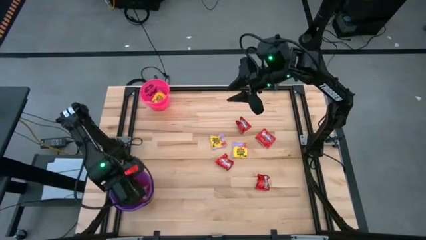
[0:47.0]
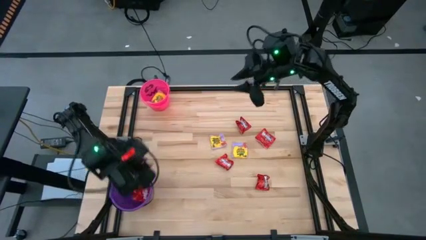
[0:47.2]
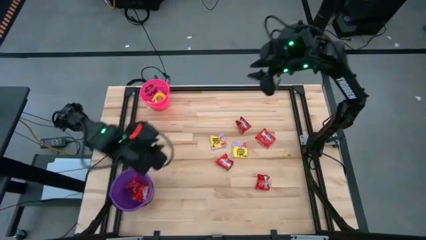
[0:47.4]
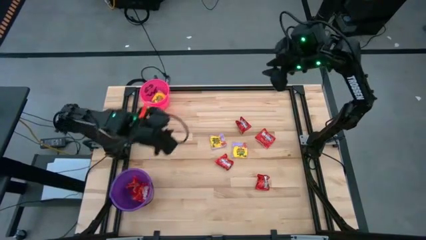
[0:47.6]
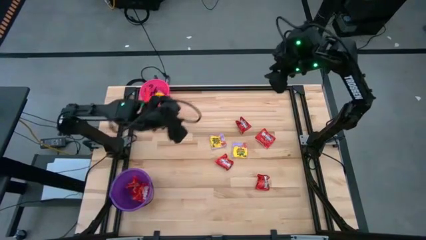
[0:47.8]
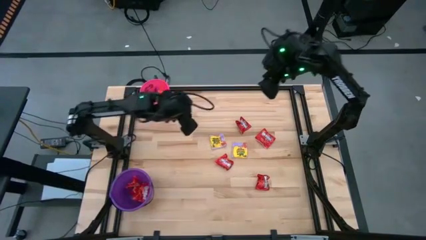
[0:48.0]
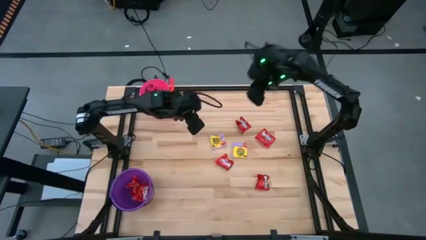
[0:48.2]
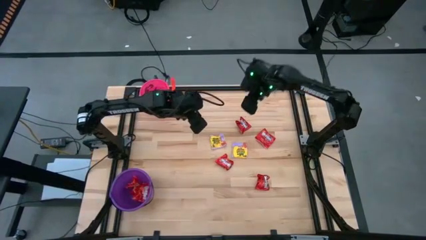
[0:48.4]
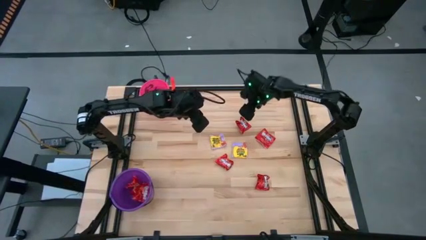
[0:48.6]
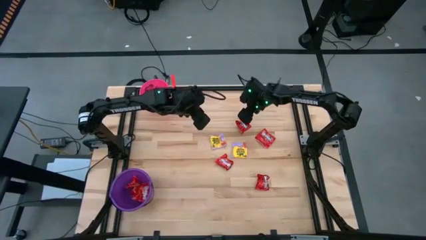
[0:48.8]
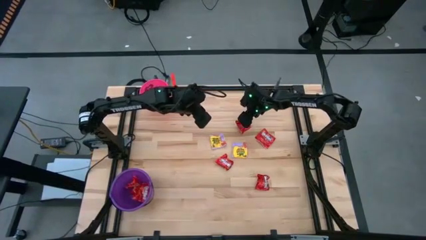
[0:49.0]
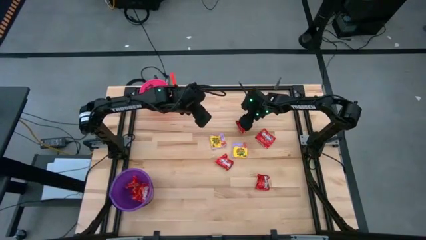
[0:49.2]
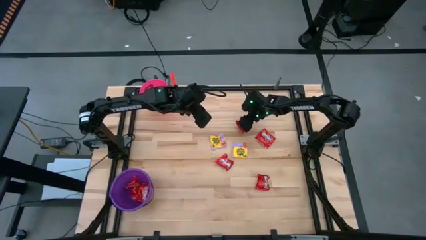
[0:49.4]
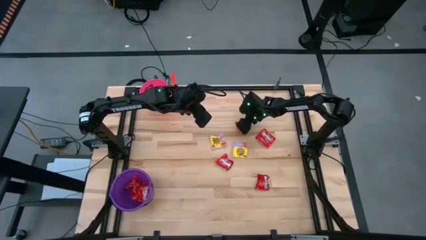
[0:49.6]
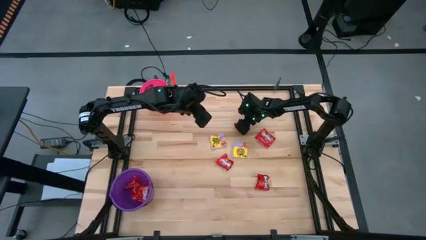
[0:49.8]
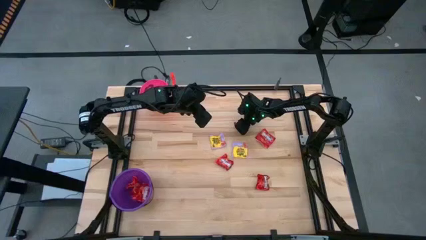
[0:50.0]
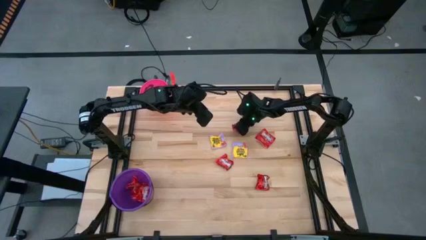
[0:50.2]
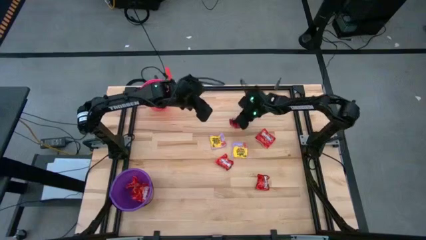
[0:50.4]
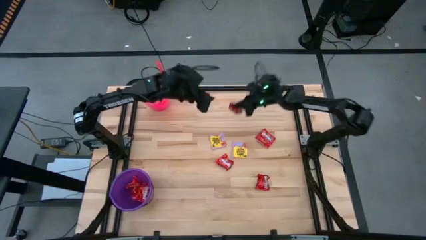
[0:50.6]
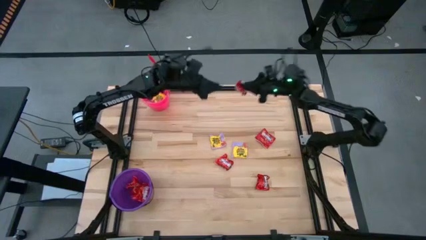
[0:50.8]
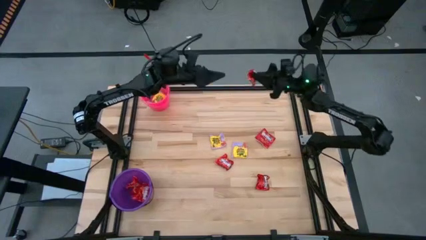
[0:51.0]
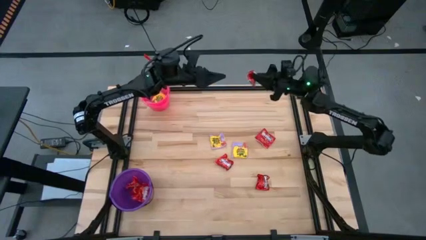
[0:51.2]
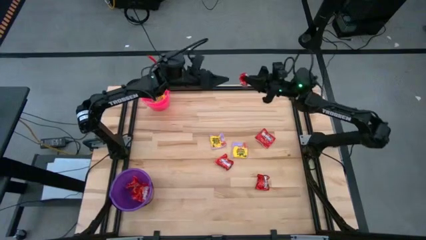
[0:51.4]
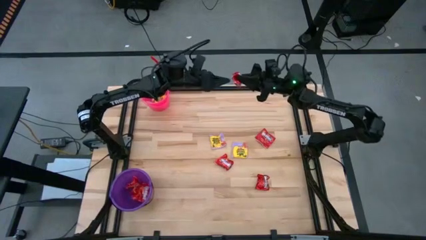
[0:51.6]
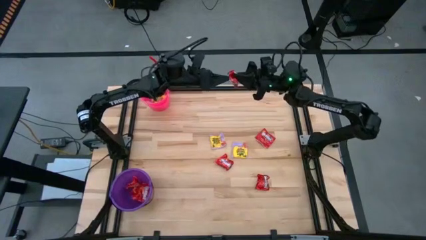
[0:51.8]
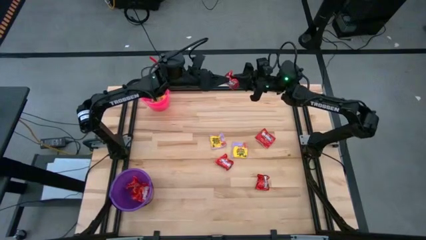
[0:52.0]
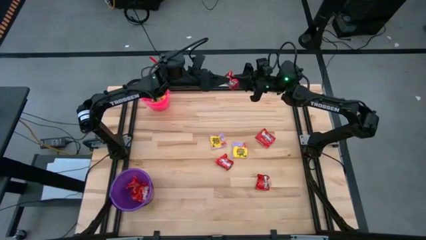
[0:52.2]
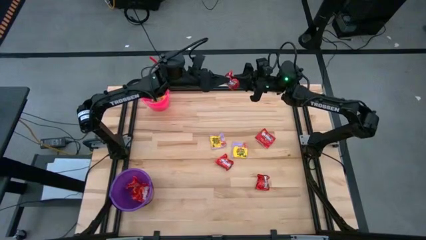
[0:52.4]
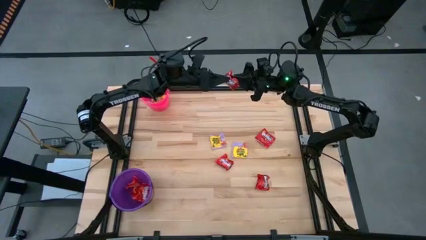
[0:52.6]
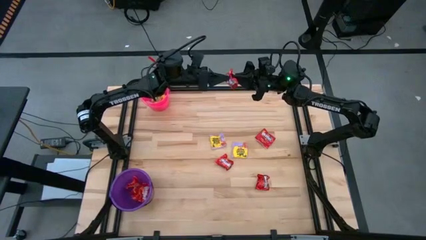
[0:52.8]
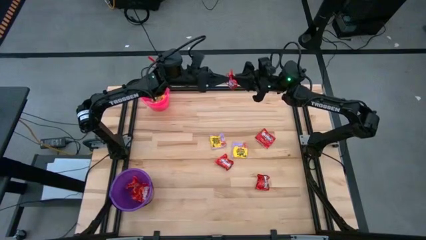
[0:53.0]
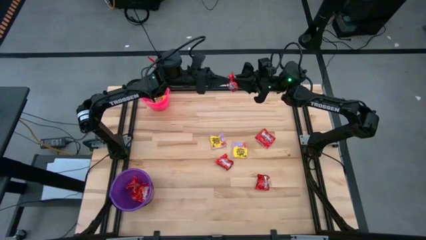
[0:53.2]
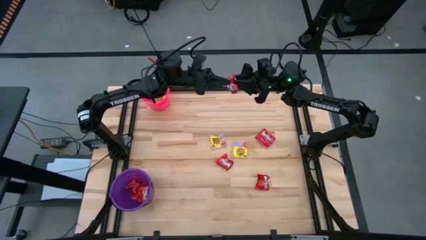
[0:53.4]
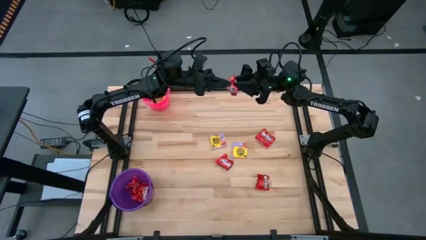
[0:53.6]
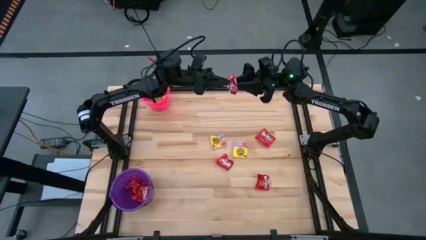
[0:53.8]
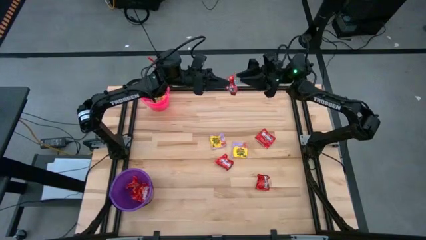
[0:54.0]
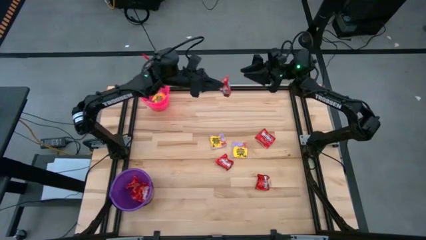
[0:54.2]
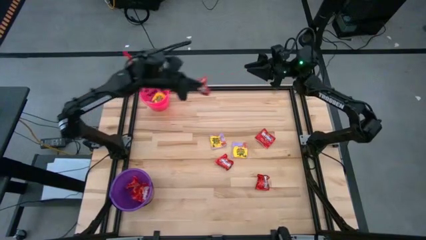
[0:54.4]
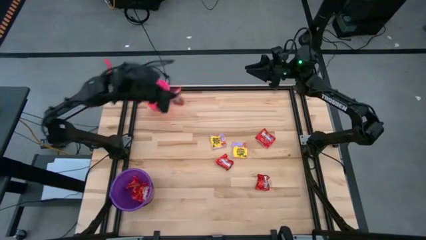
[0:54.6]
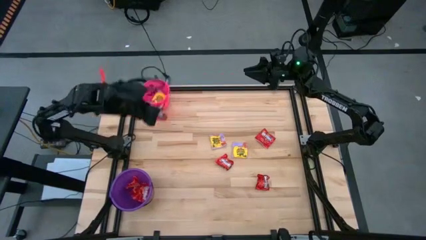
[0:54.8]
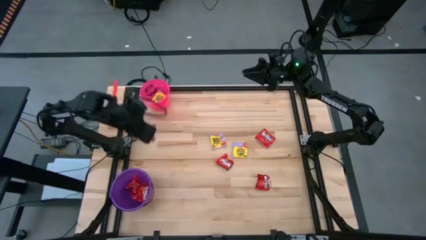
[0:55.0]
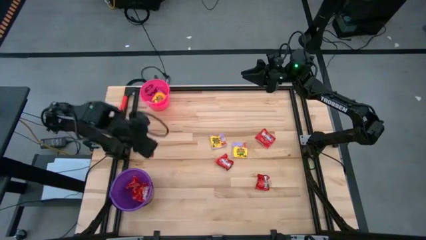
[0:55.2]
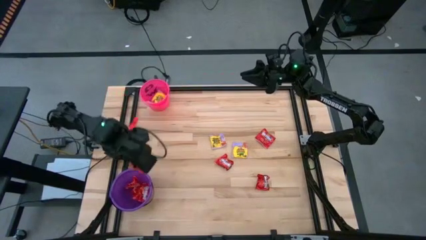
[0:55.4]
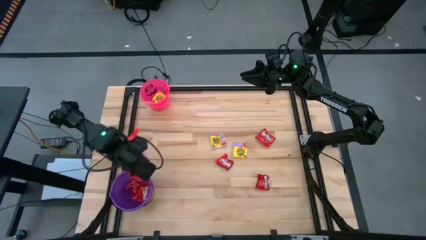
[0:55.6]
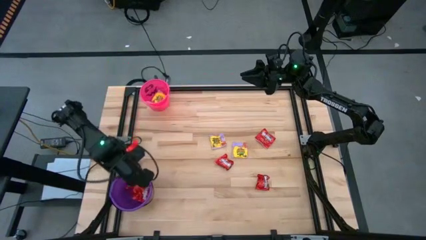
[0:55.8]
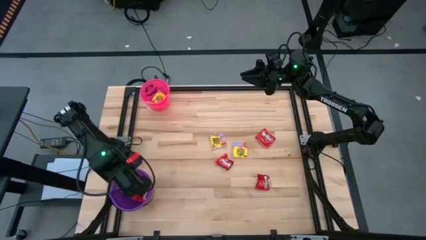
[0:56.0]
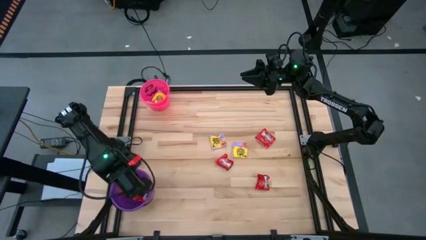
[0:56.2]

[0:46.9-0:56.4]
Task: Sort candy by brand, put in halloween buckets
Put the red candy into the violet bucket

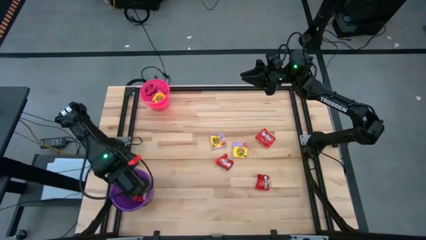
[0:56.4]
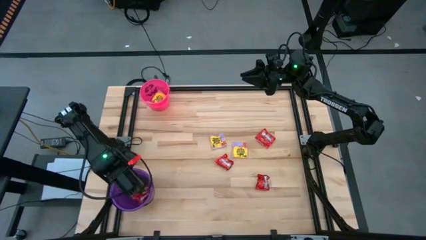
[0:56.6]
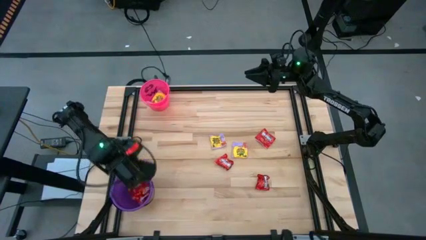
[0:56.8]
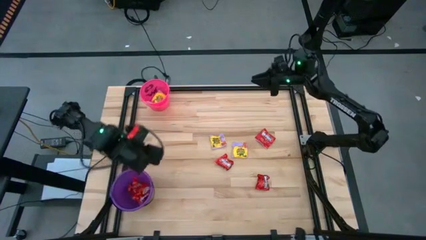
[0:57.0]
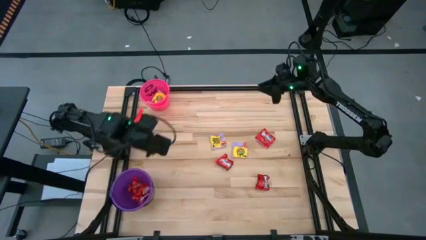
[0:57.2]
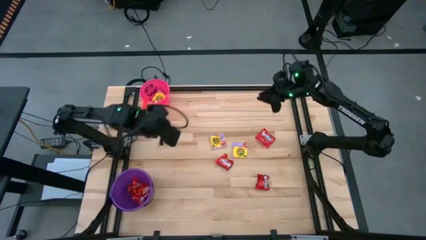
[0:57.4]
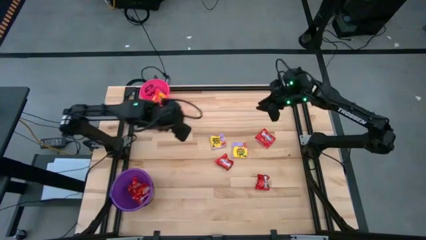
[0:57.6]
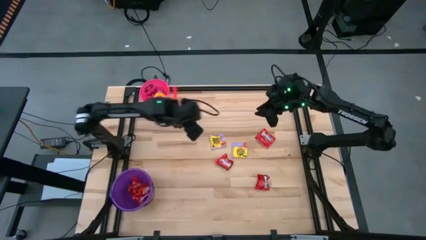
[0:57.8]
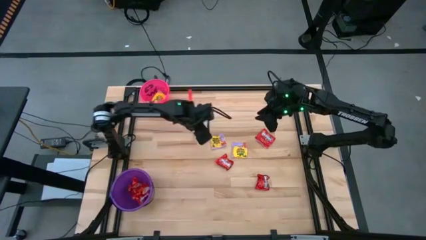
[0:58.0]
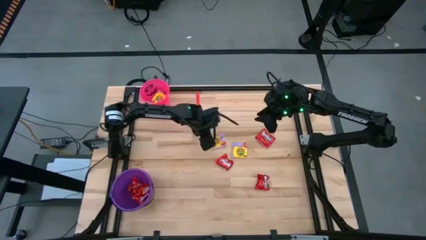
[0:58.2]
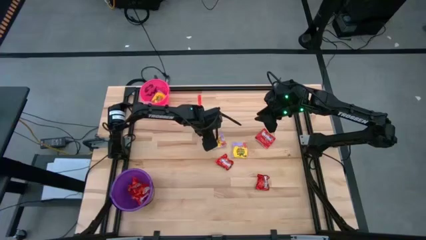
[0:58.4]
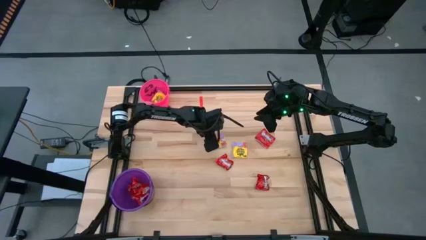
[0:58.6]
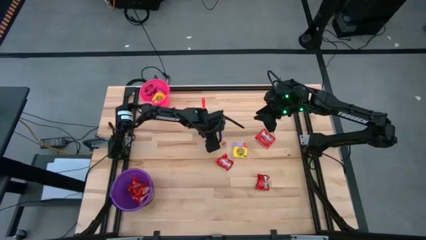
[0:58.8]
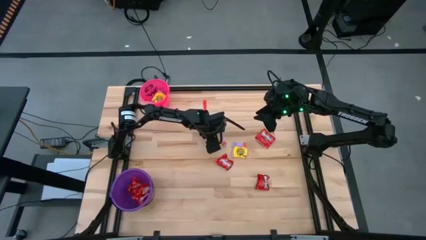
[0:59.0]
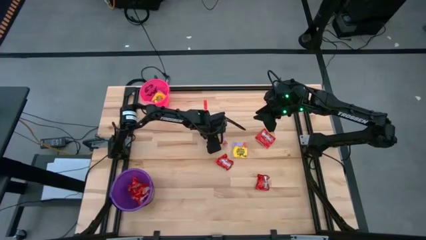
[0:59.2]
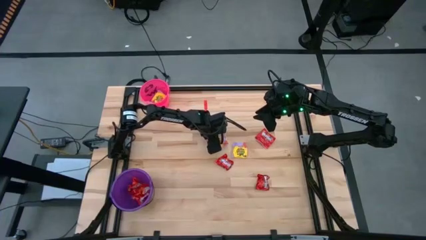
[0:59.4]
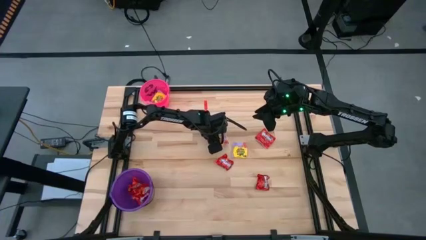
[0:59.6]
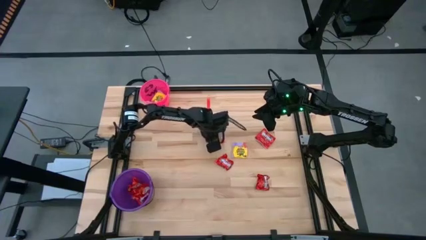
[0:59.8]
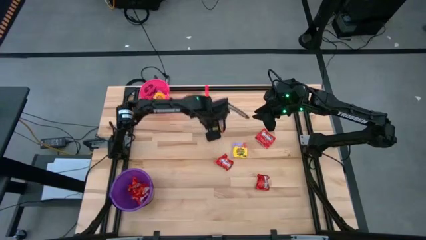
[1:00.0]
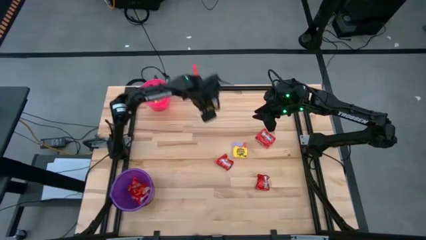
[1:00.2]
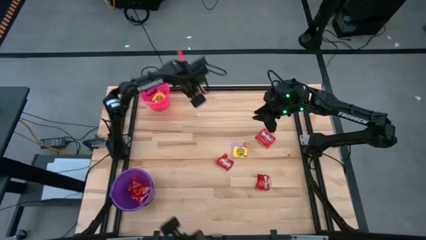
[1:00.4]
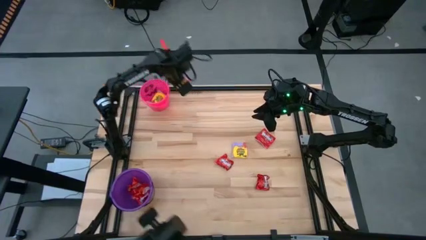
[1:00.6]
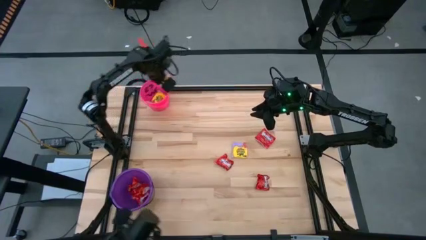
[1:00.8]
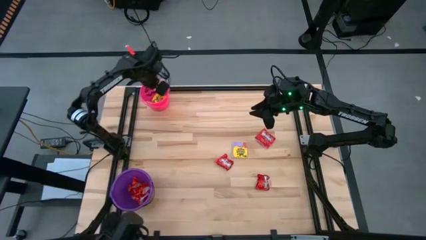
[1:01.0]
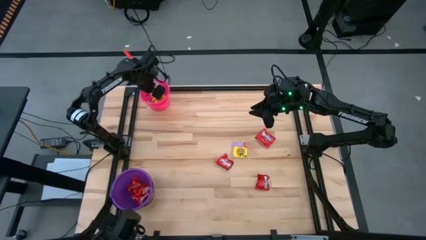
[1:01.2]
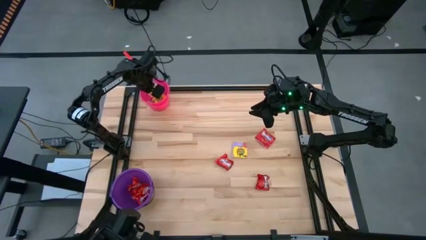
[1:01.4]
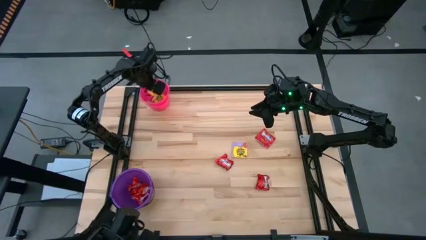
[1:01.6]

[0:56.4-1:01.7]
Put the yellow candy into the pink bucket

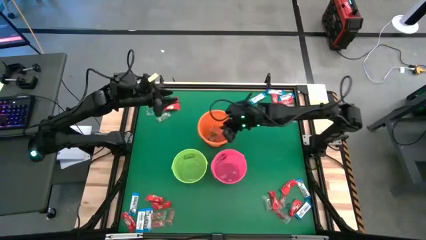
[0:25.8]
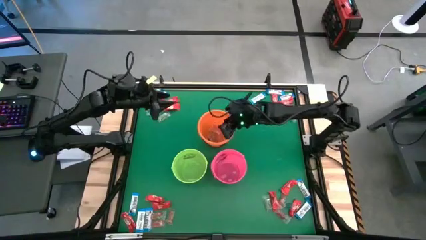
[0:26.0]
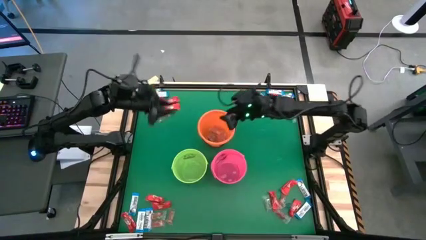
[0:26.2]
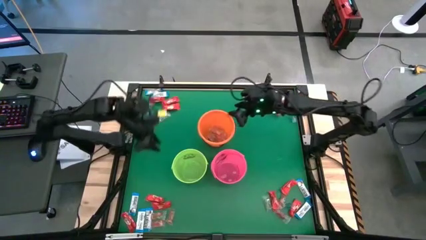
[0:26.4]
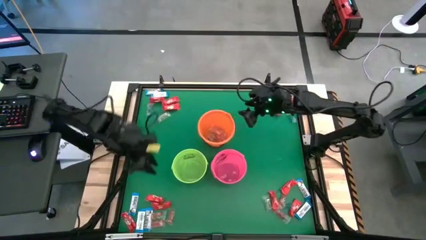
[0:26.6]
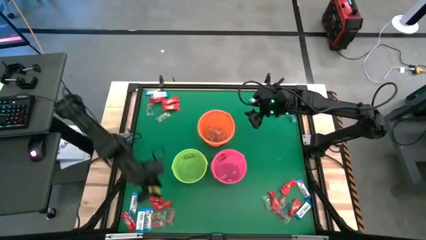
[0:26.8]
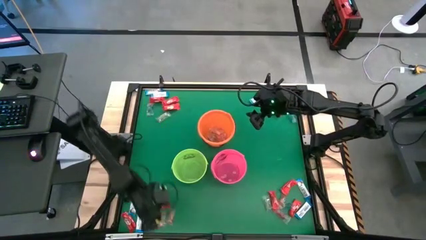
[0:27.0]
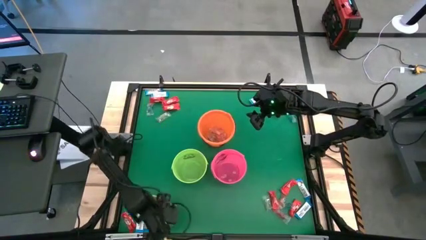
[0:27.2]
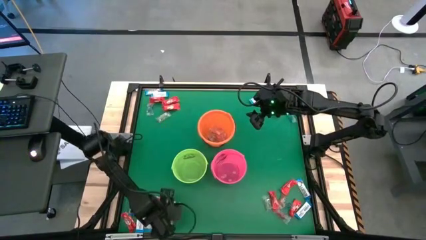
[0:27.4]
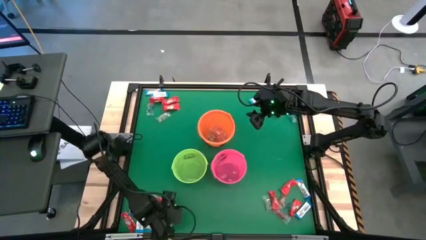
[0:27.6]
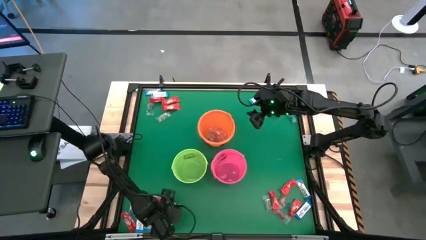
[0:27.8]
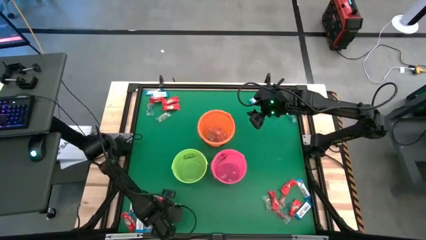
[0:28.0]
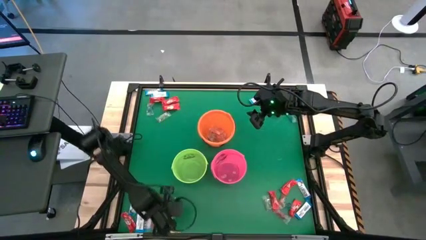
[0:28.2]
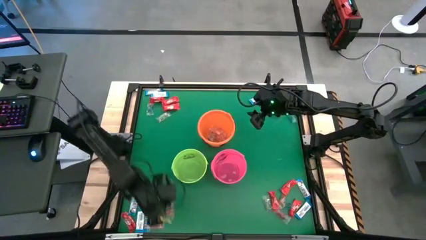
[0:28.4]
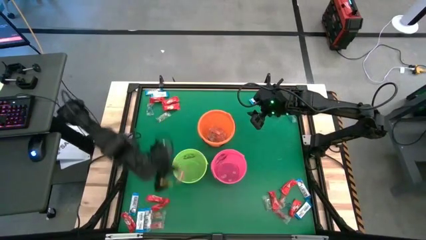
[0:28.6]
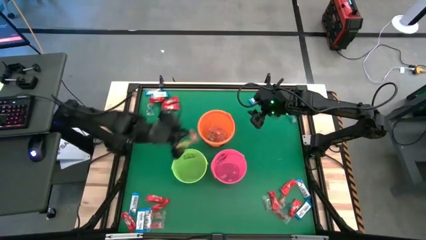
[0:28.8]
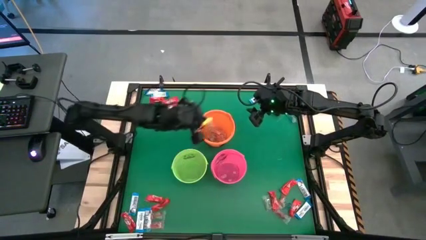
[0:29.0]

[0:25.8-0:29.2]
Task: Sort candy by brand, put in halloween buckets
Put the orange gummy into the orange bucket
